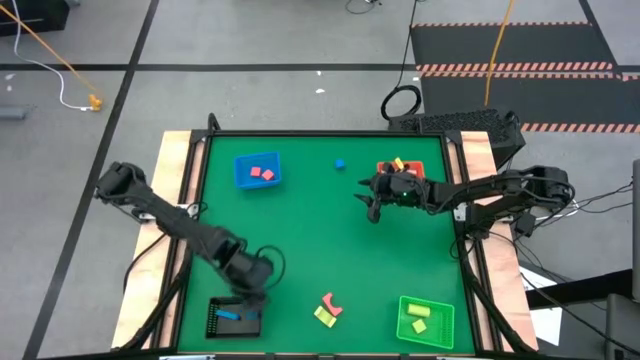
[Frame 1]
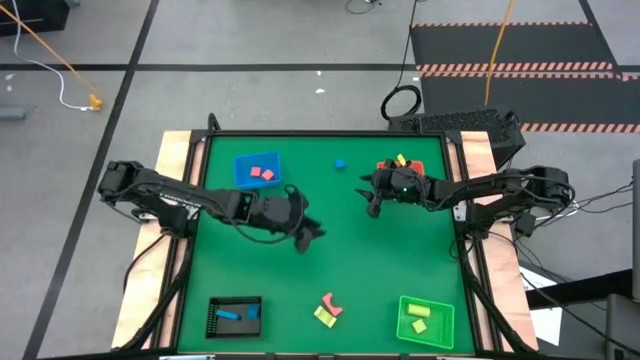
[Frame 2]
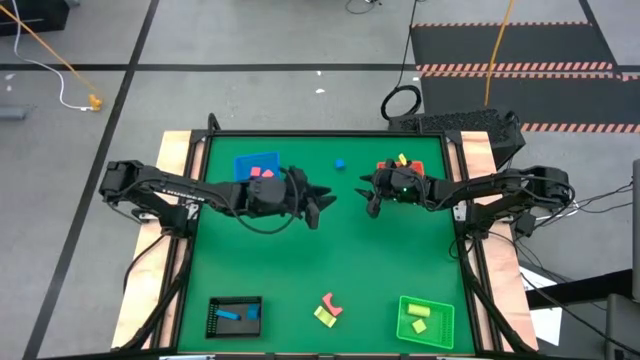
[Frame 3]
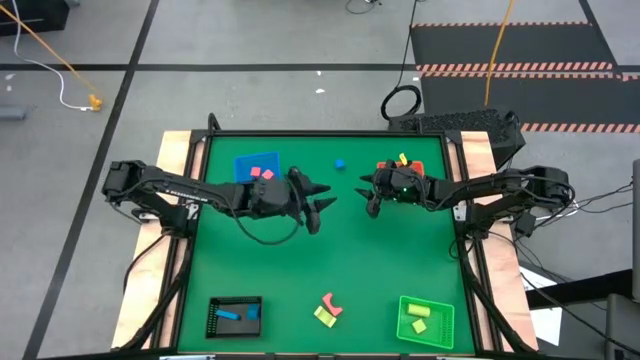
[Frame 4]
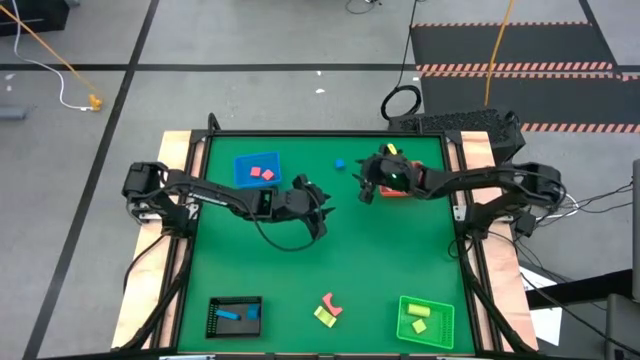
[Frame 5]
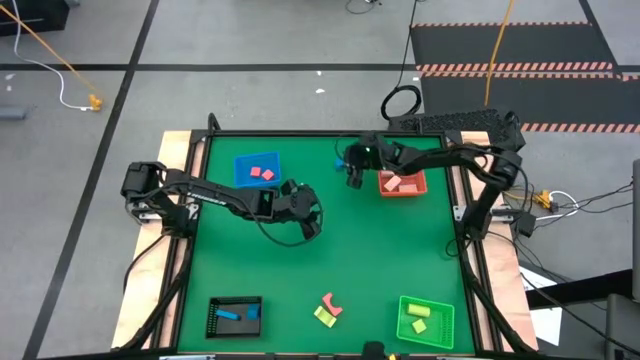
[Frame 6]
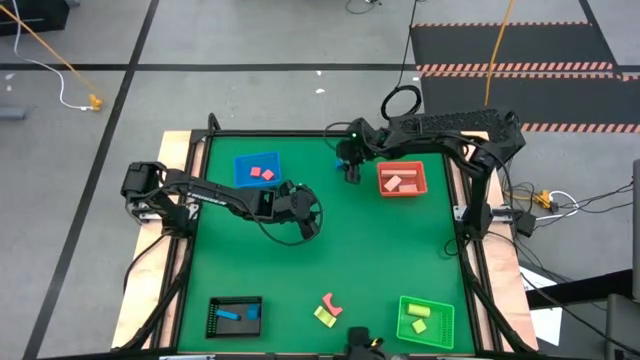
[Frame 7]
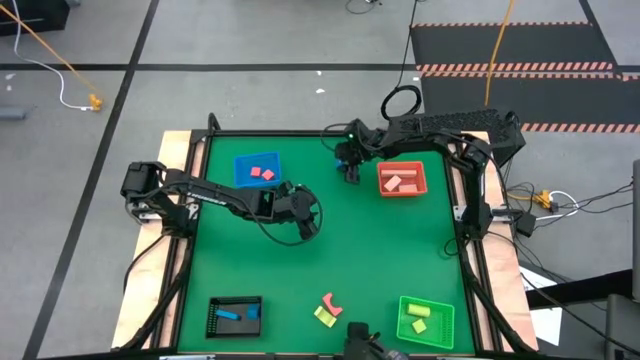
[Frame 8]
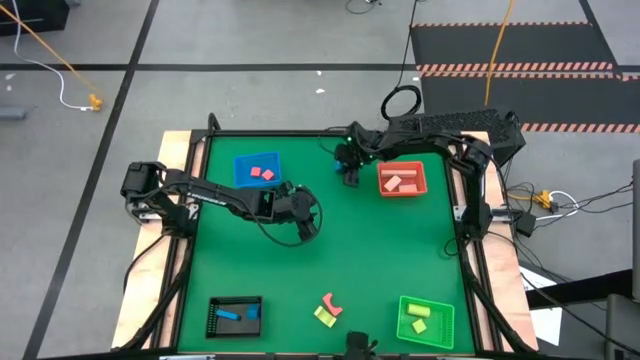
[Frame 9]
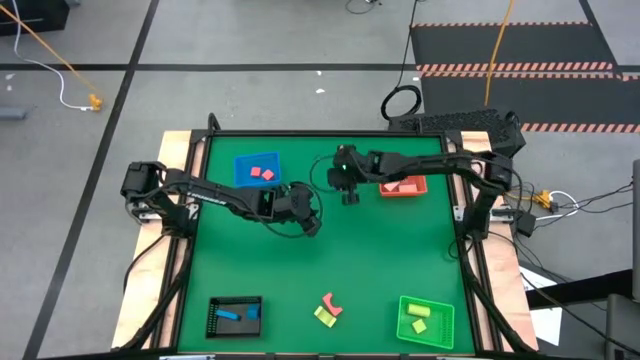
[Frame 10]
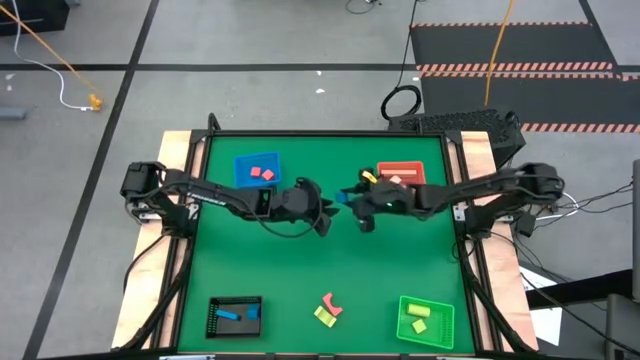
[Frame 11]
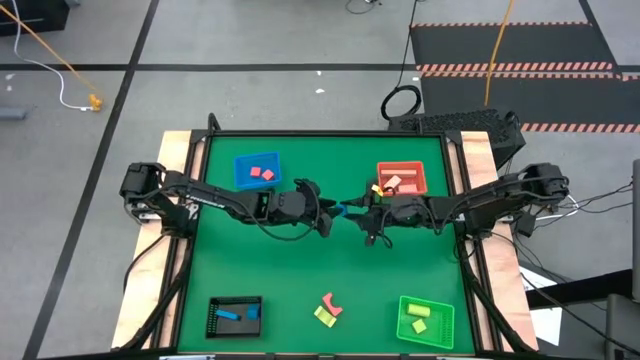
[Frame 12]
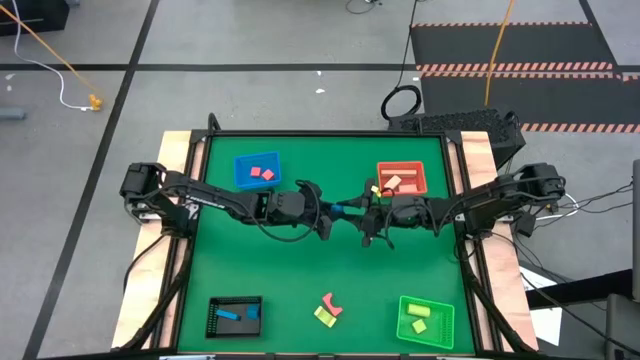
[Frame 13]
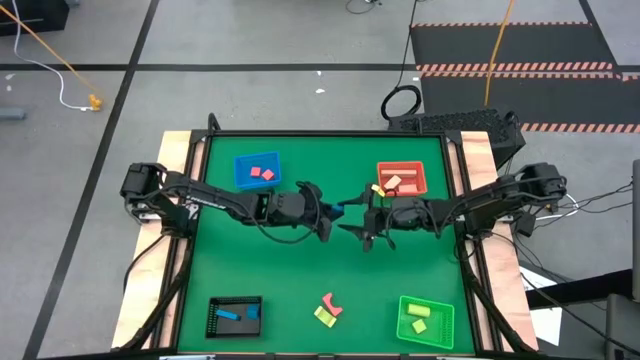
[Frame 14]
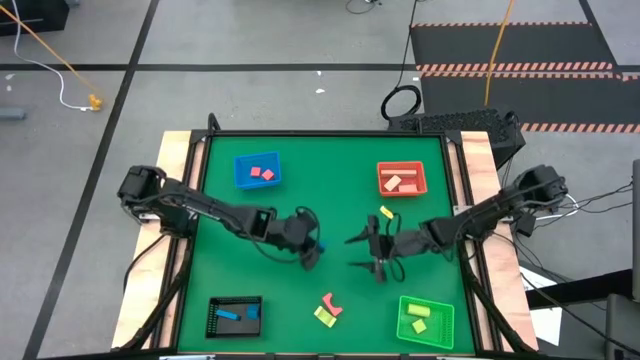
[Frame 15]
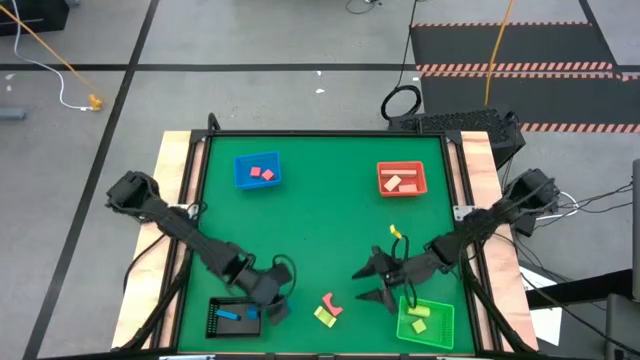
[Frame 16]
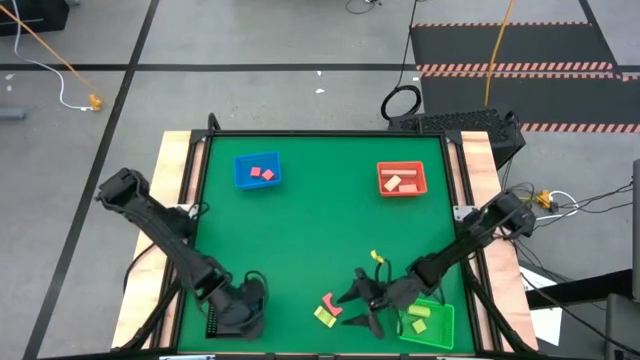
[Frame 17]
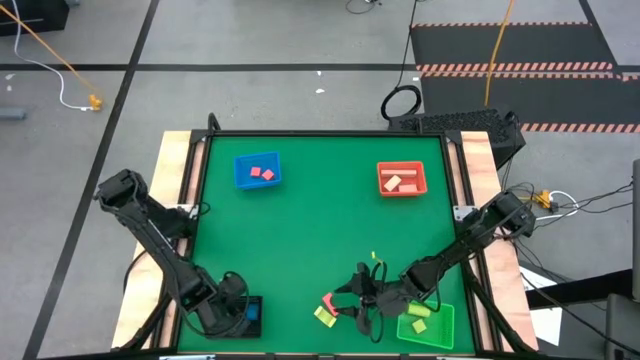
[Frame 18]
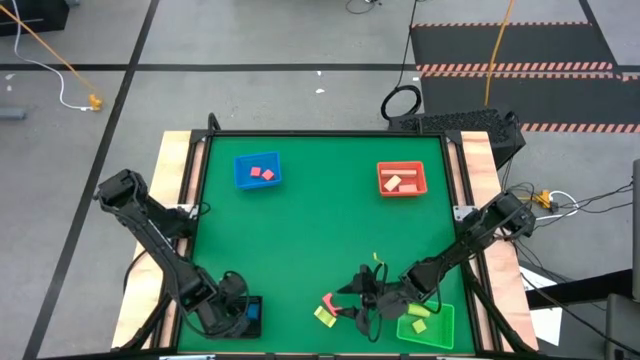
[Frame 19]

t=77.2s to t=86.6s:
Task: Sort & place blocks by color
Put the blue block in the black basket

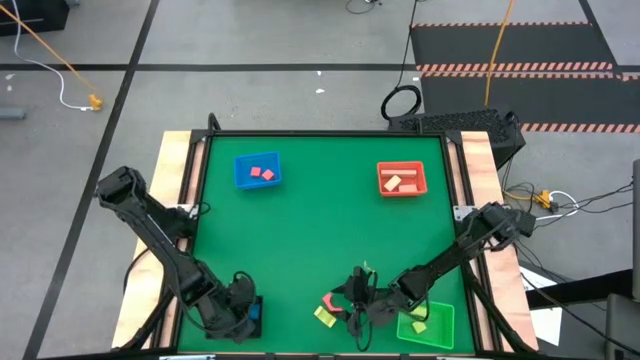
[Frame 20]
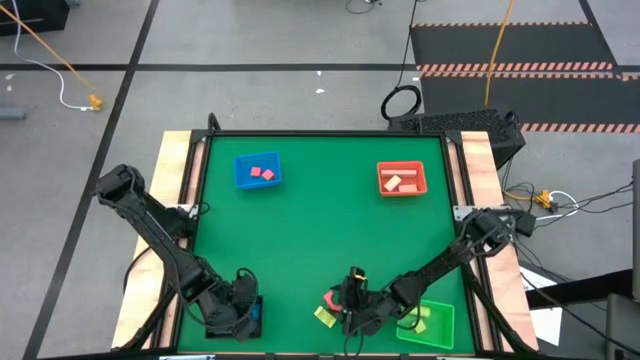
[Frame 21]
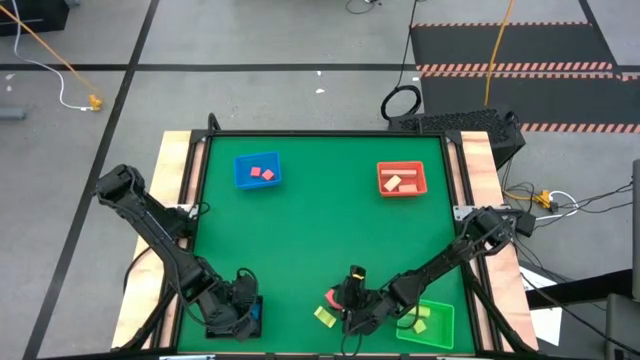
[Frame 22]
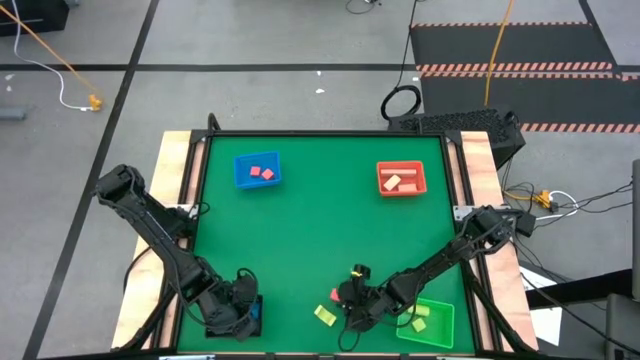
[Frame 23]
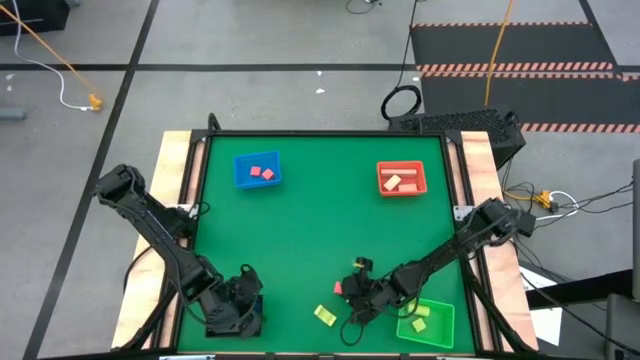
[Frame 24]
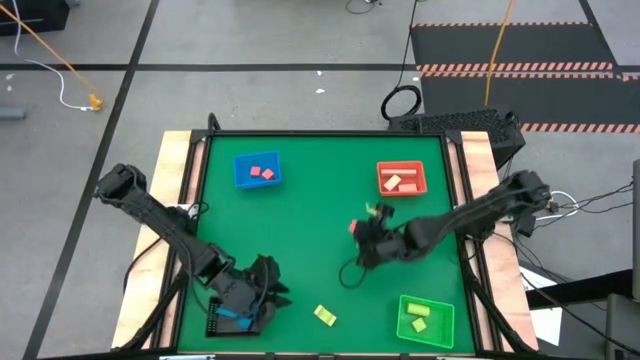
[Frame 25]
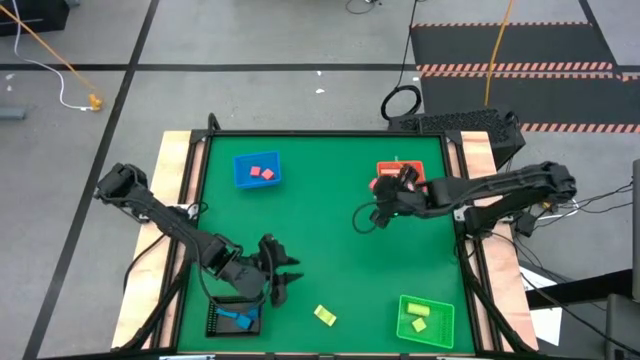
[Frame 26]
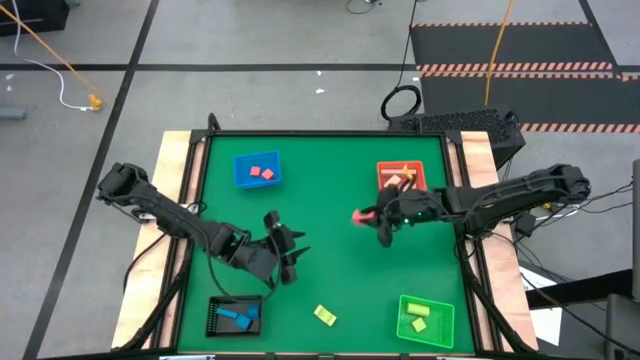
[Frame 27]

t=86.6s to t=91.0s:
Put the orange block in the blue basket

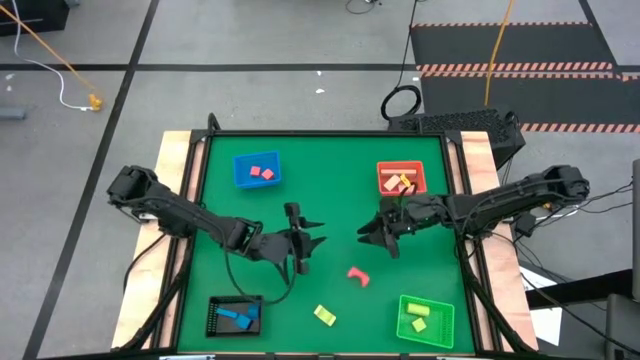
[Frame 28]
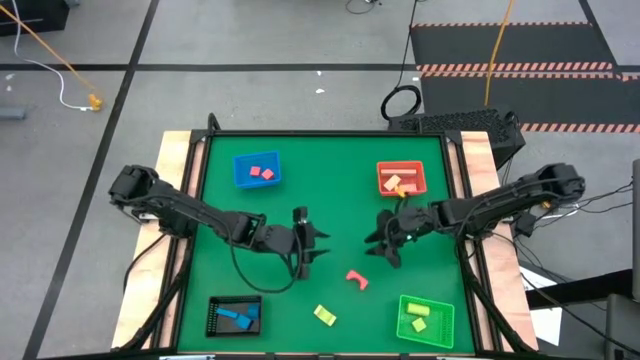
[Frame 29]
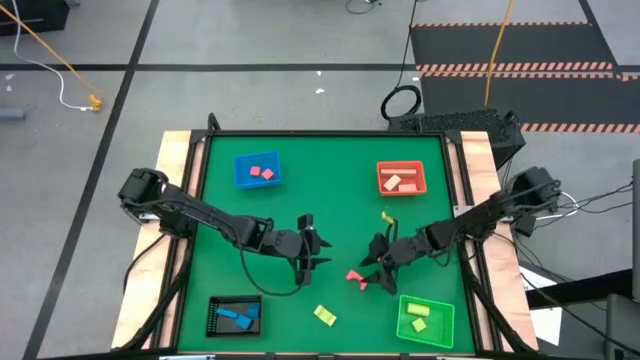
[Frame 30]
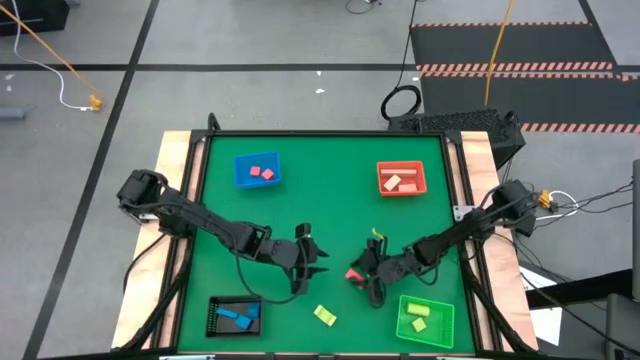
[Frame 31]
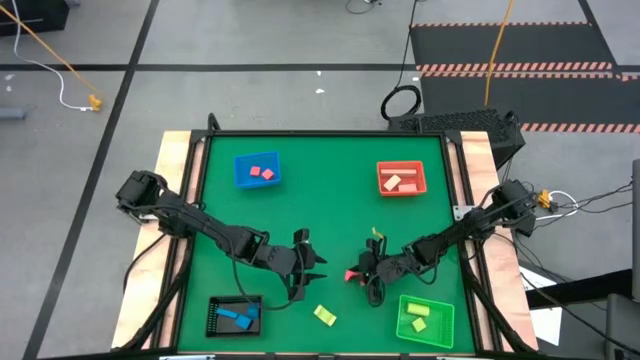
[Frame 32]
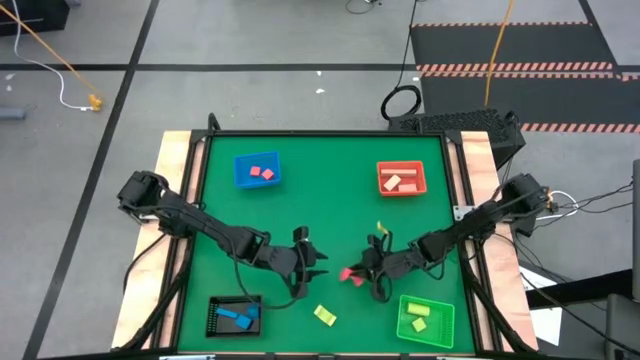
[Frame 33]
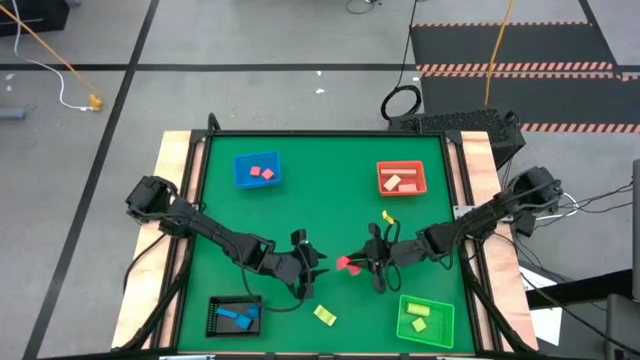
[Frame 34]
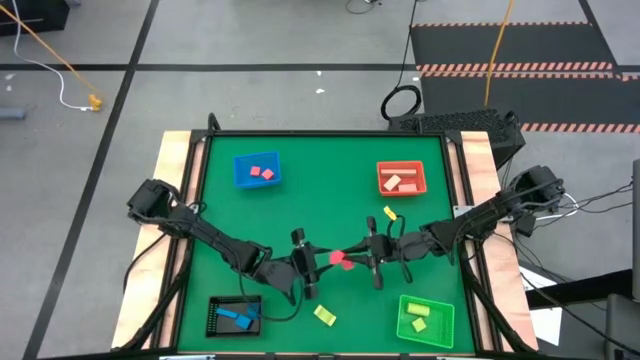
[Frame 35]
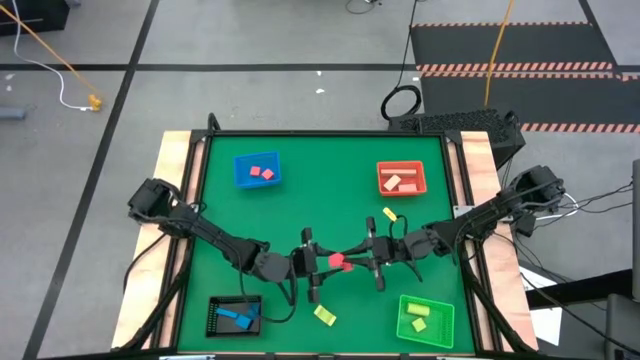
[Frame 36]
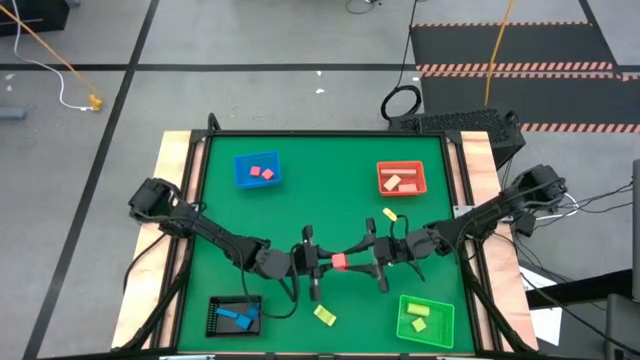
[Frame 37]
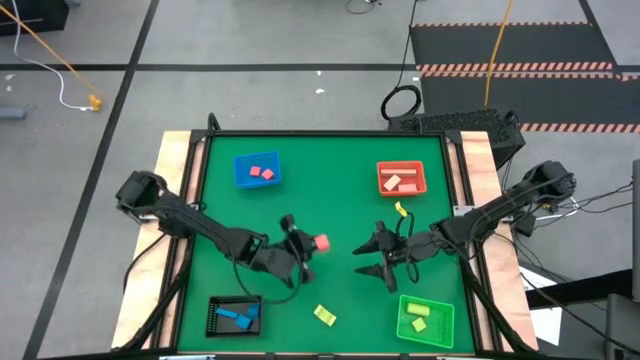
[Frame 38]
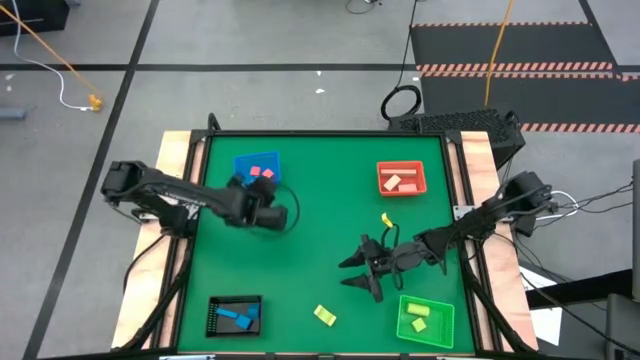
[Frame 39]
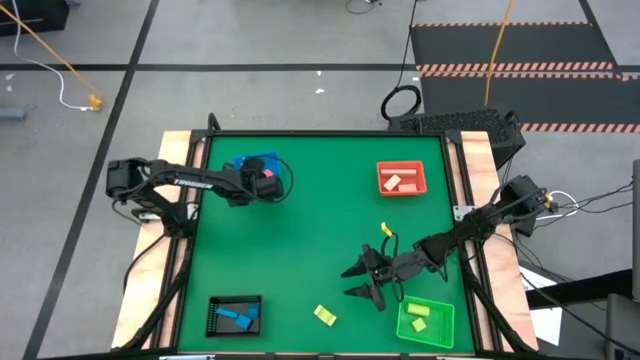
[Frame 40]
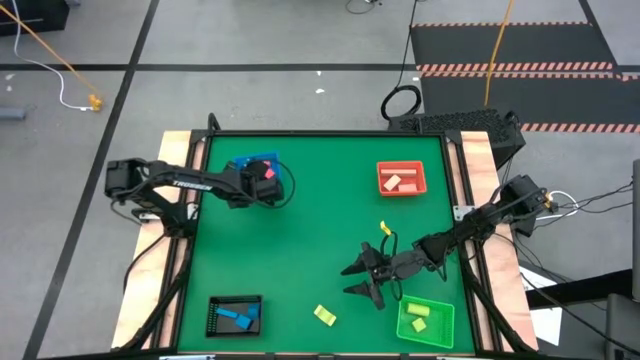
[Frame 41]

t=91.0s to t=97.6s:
Put the orange block in the blue basket

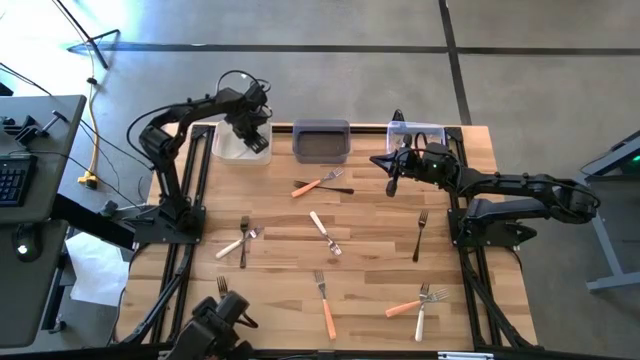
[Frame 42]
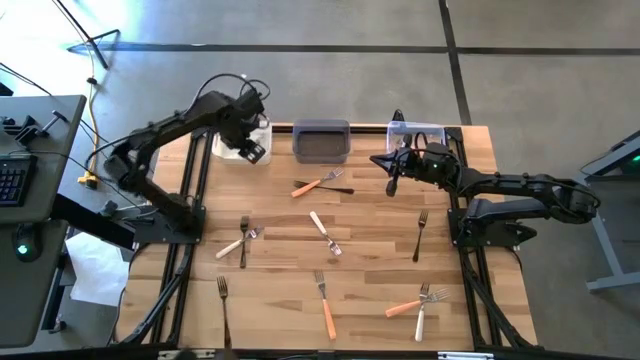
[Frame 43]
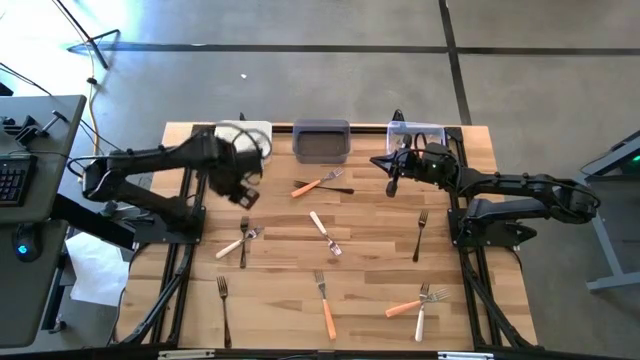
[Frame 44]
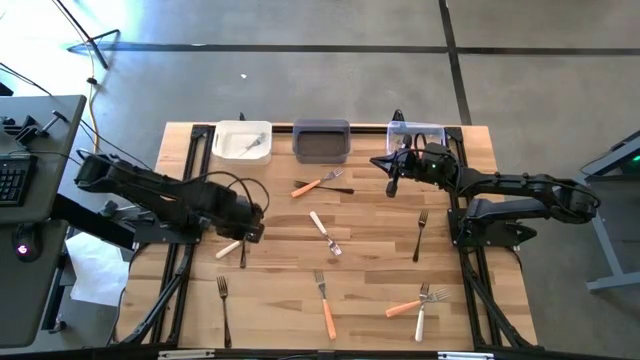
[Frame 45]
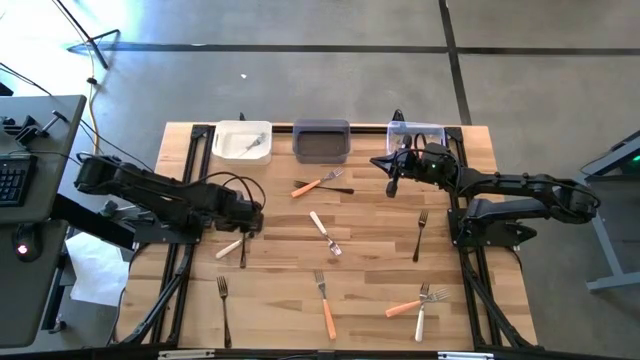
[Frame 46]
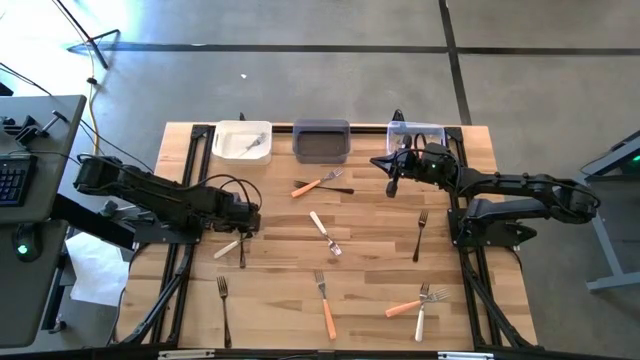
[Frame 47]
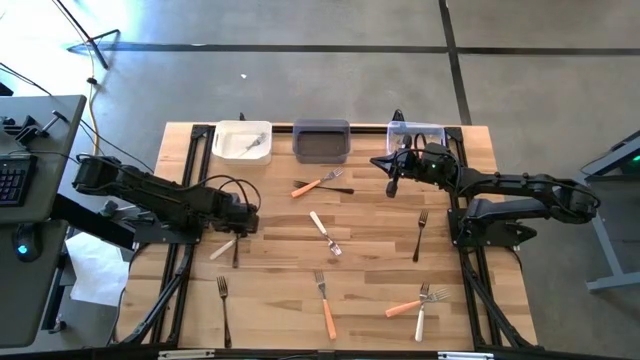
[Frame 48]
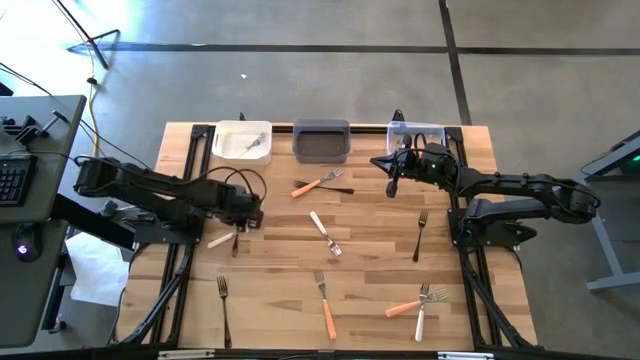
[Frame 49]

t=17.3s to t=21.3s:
Task: Sort silverware by color (type)
Put the black fork into the black bin
